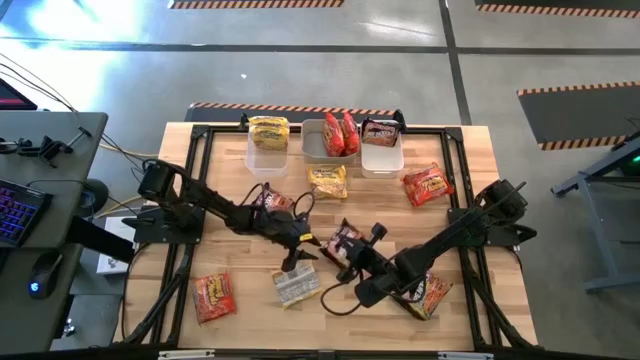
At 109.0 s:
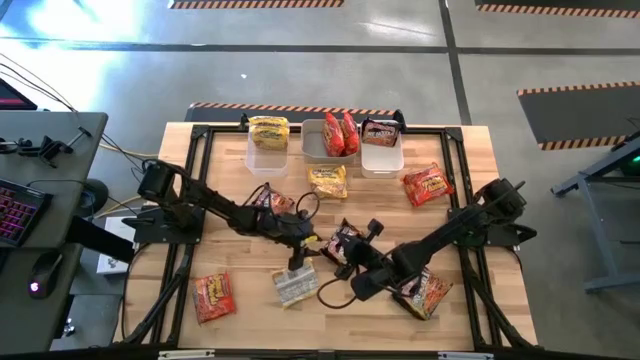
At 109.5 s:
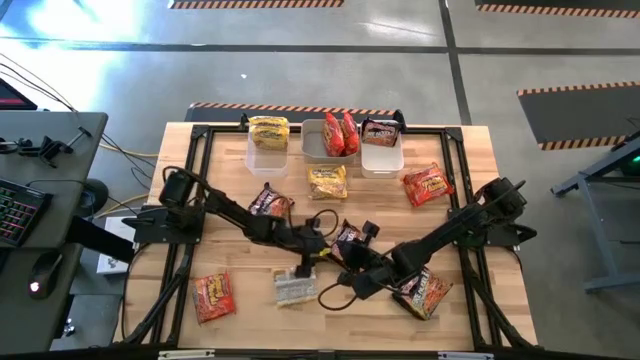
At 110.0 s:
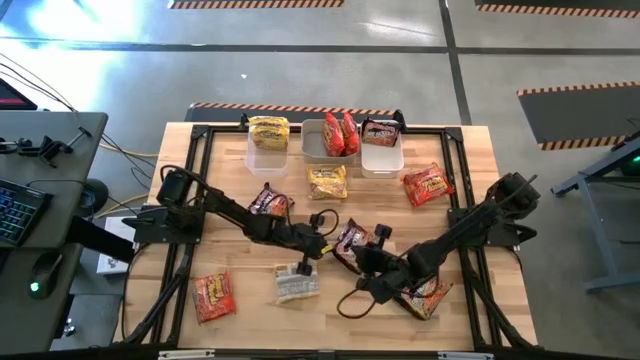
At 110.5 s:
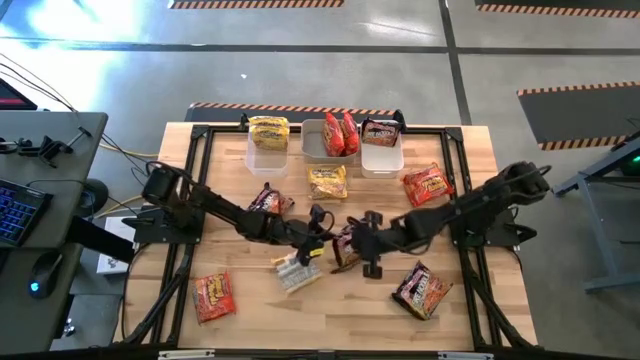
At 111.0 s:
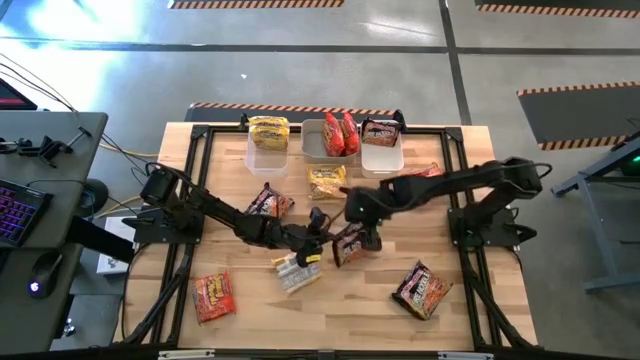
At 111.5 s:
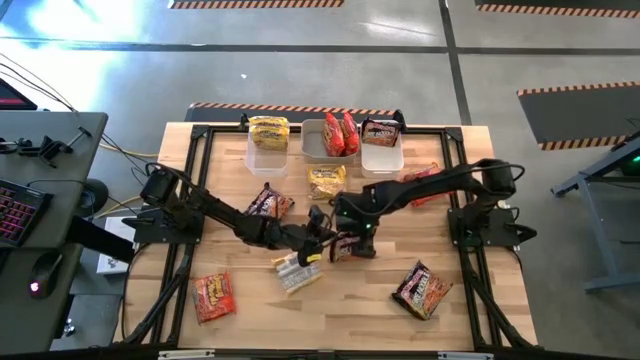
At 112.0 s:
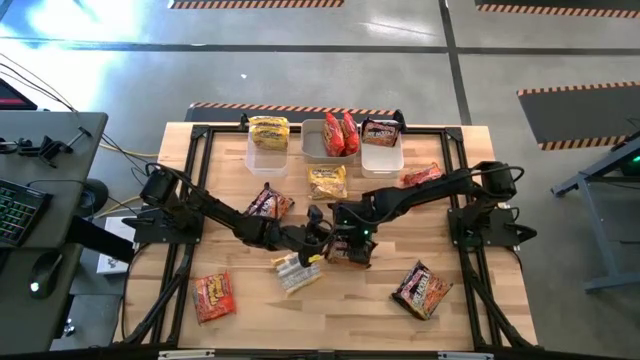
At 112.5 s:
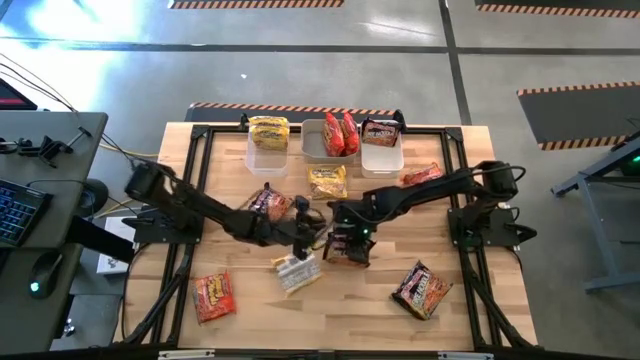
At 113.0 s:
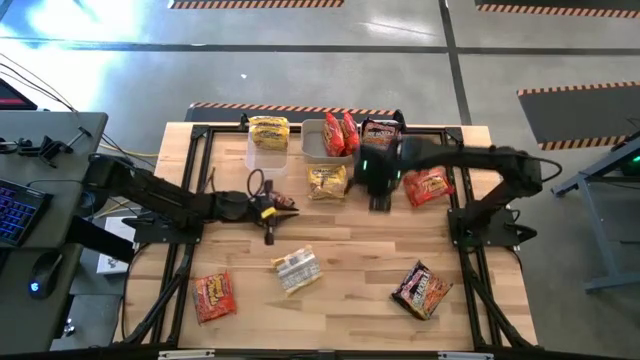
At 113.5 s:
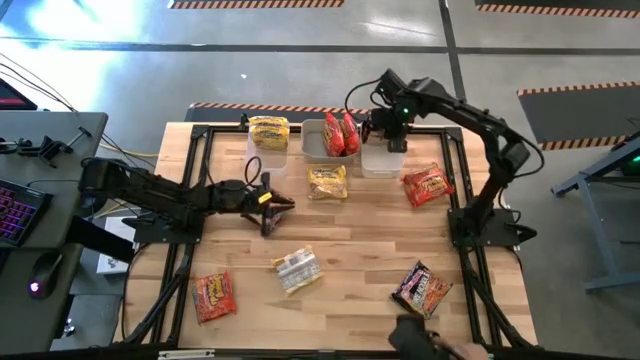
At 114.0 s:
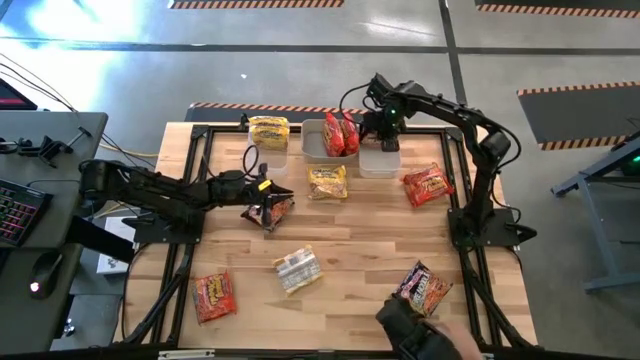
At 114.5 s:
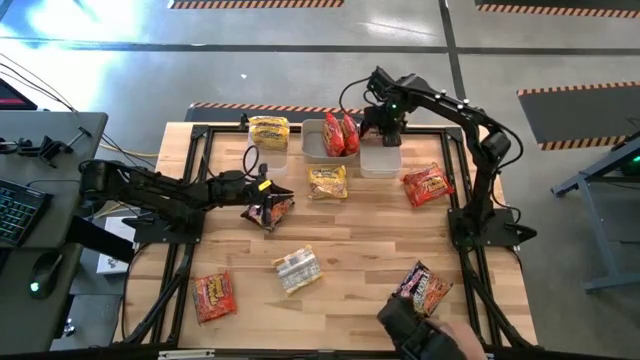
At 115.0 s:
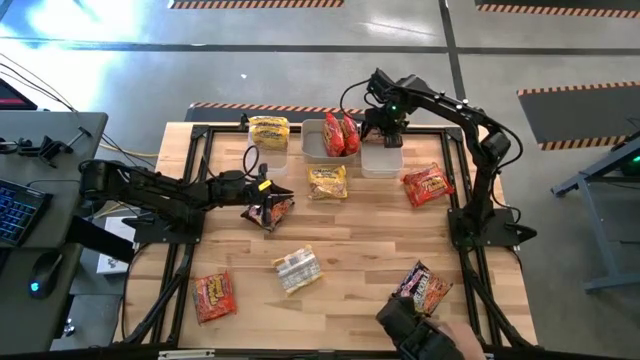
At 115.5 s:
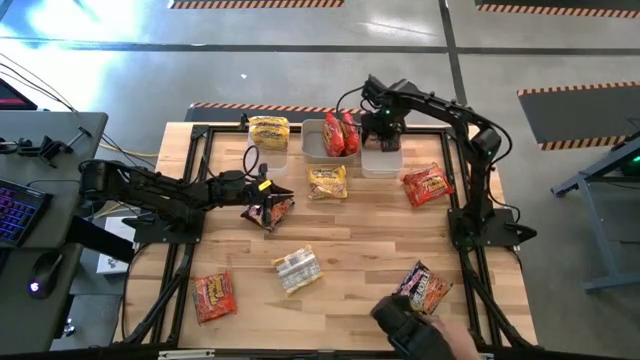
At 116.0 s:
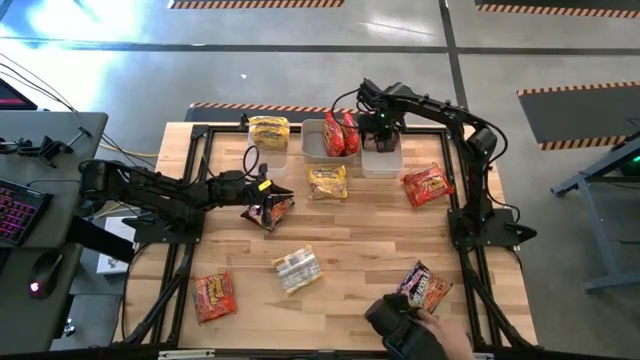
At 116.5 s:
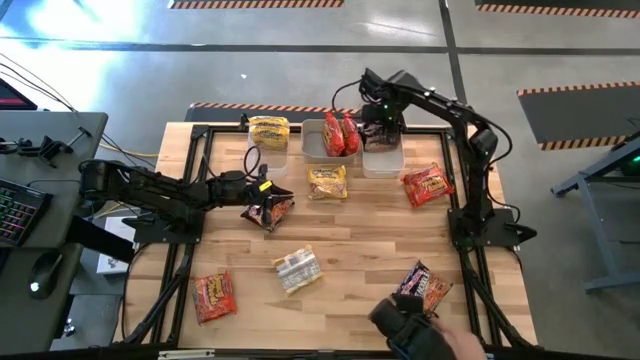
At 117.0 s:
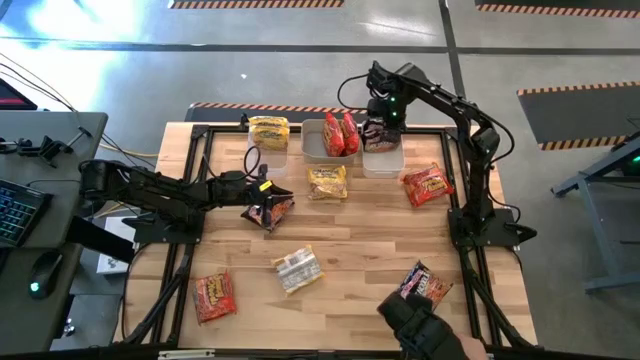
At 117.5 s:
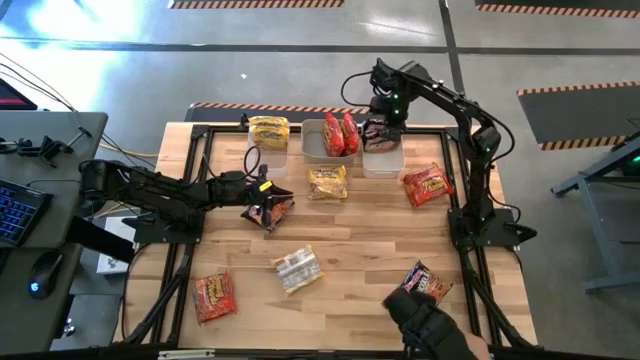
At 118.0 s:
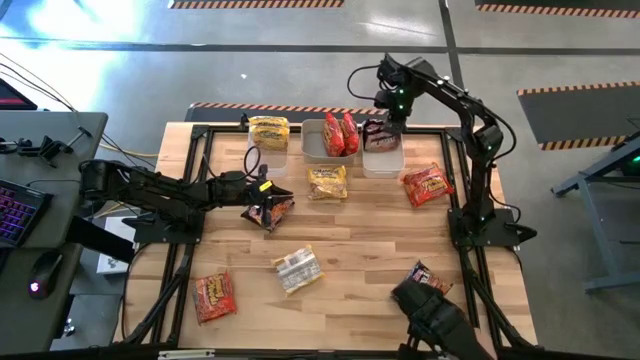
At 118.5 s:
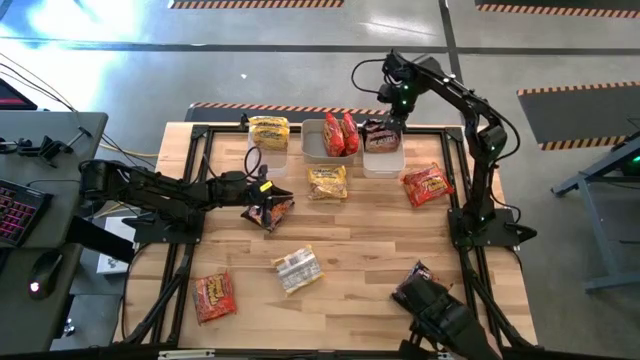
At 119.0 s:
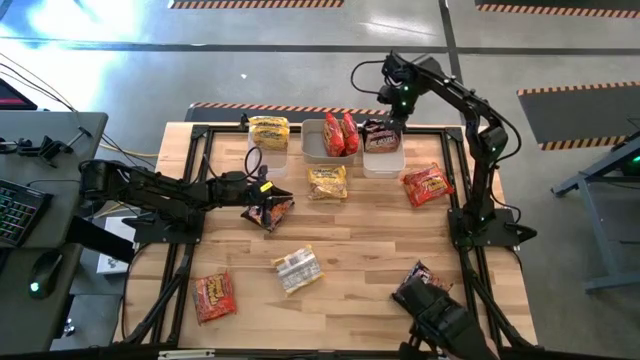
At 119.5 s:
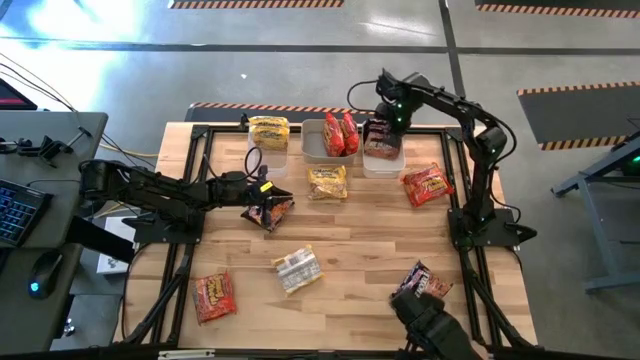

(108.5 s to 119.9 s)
Task: Sort Maruchan noodles
Put the bottom left black noodle pack into the white bin

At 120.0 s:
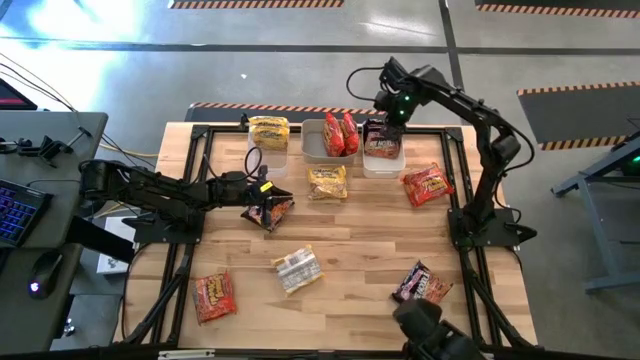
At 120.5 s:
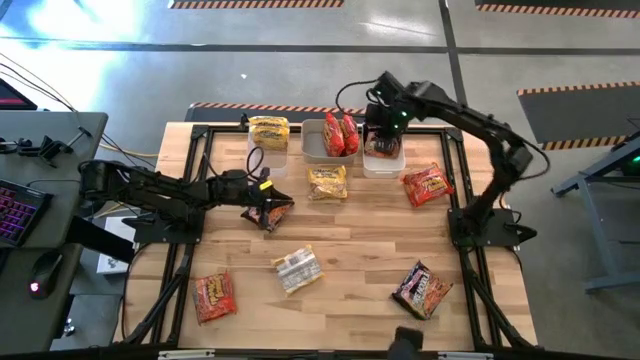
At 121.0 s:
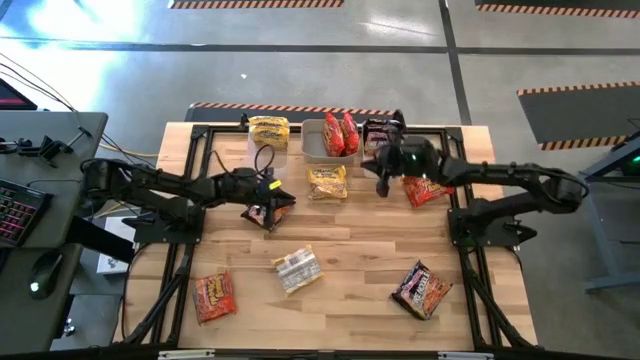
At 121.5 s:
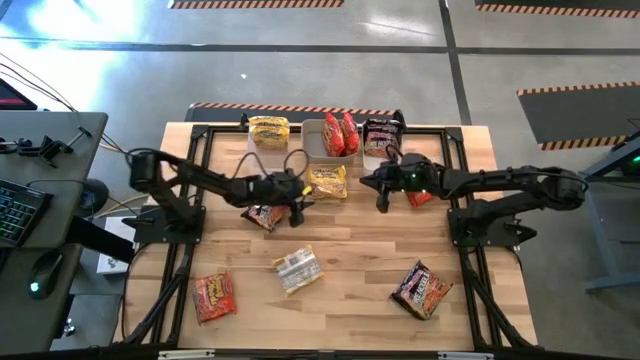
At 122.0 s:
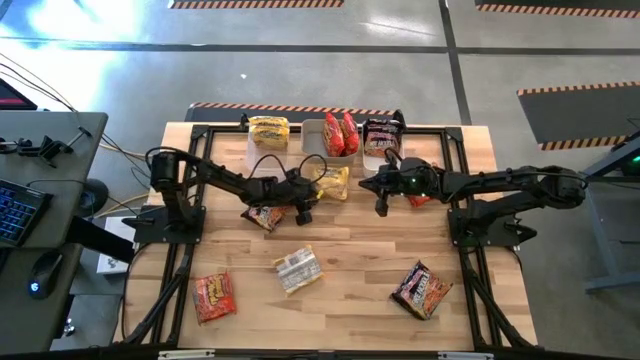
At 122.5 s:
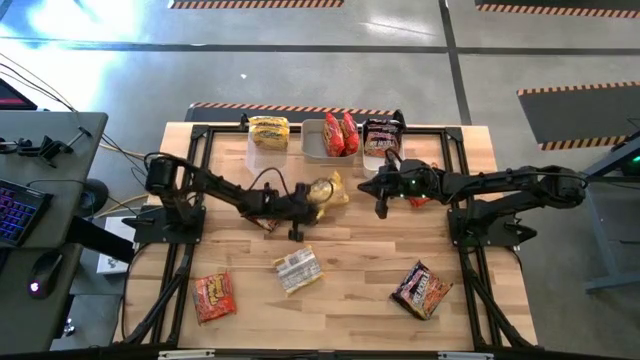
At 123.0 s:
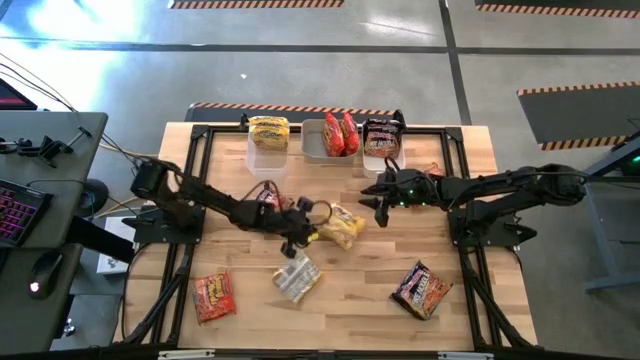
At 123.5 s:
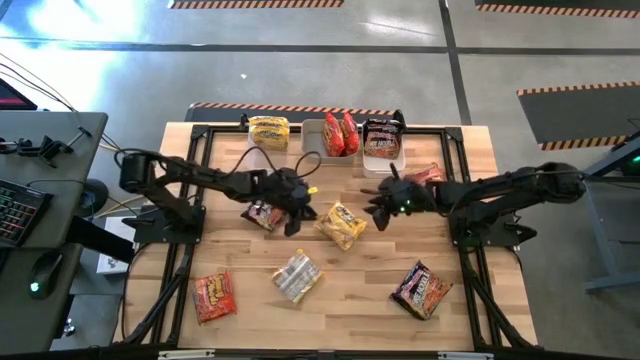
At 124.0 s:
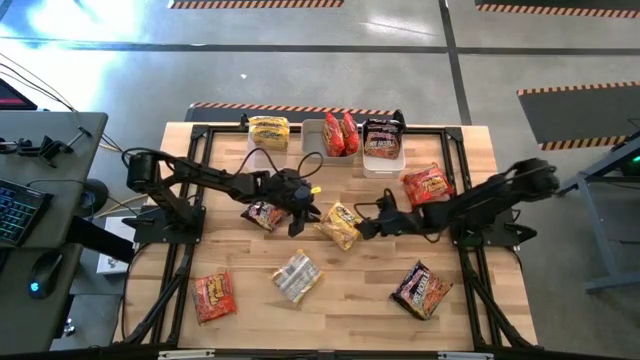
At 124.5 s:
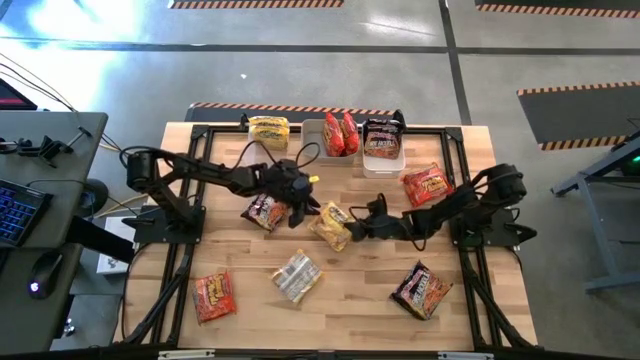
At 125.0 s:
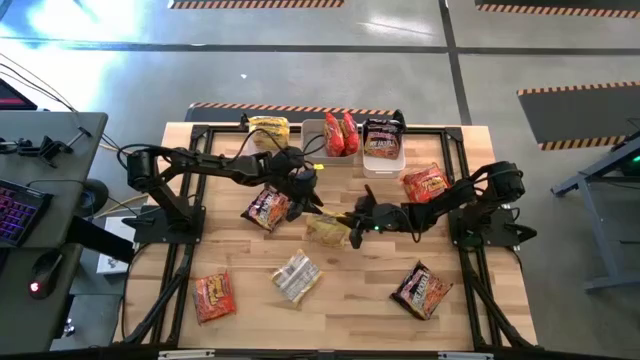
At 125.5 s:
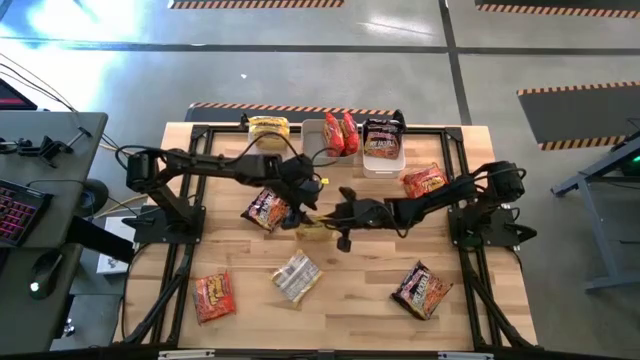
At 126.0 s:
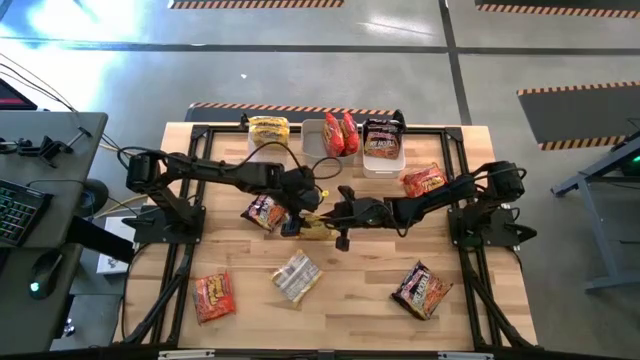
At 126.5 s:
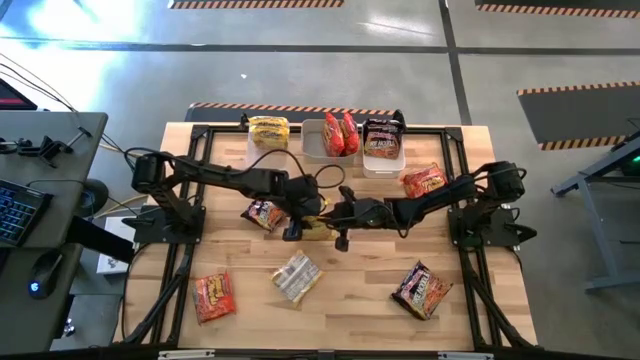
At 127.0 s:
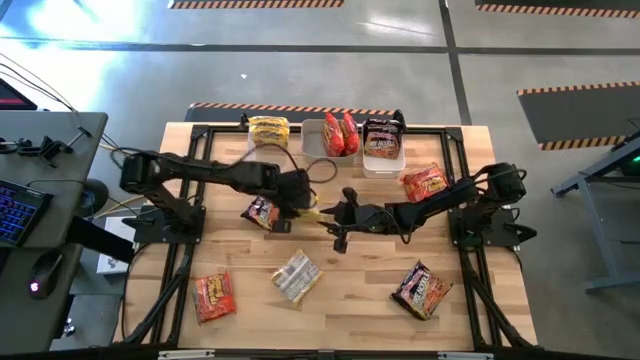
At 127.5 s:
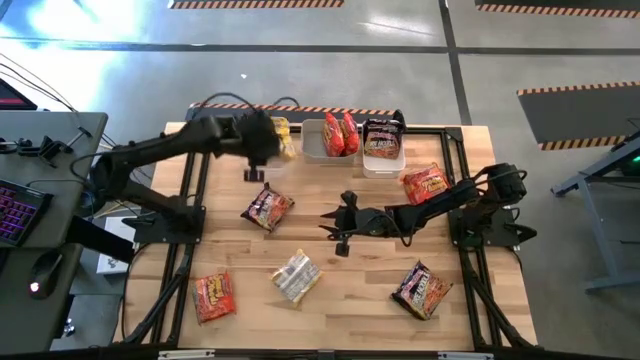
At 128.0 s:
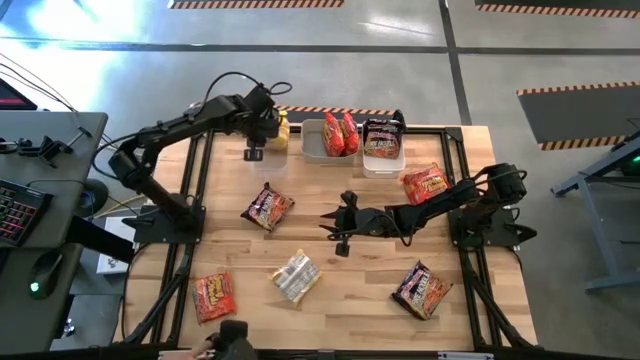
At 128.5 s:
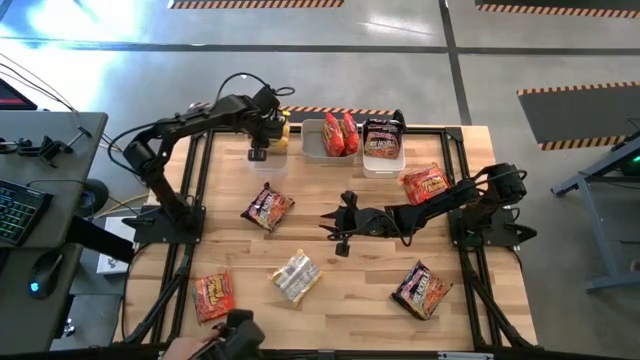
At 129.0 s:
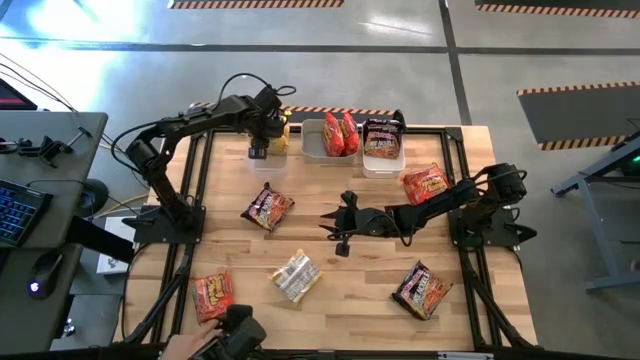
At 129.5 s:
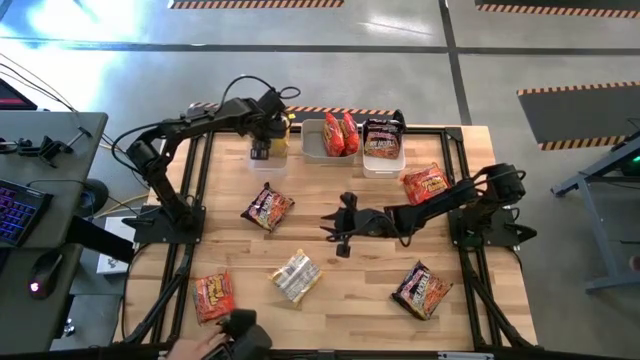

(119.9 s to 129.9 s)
Put the top yellow noodle pack into the transparent bin
